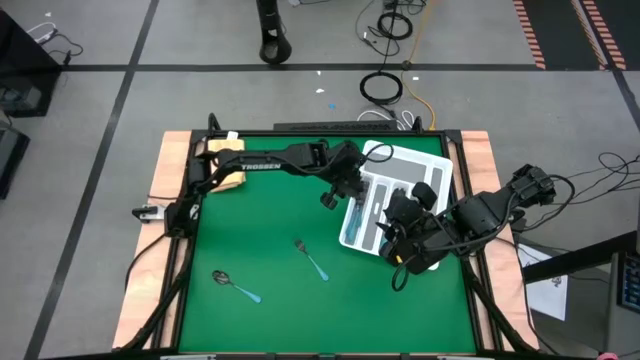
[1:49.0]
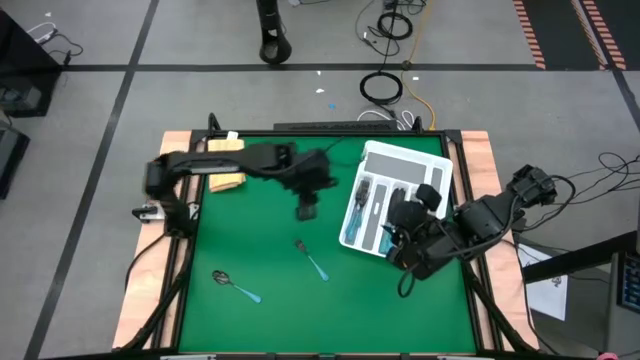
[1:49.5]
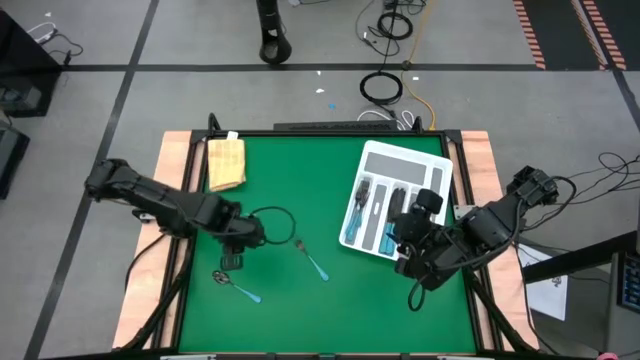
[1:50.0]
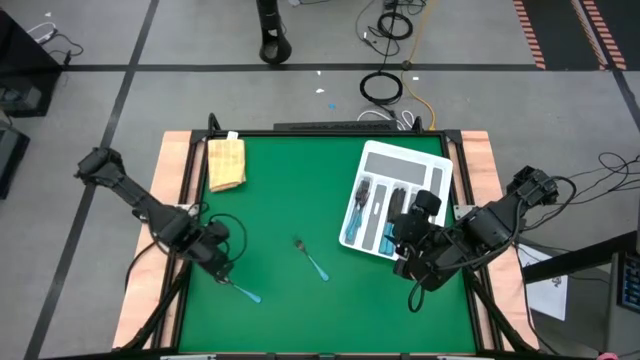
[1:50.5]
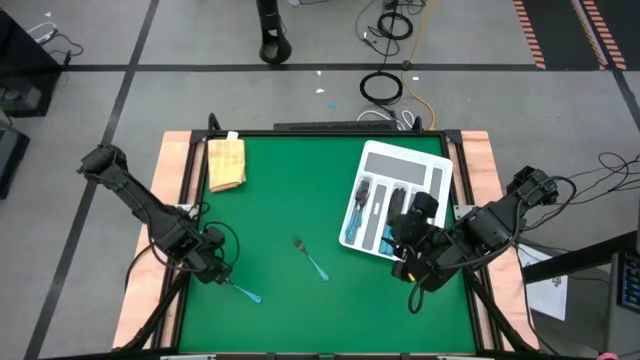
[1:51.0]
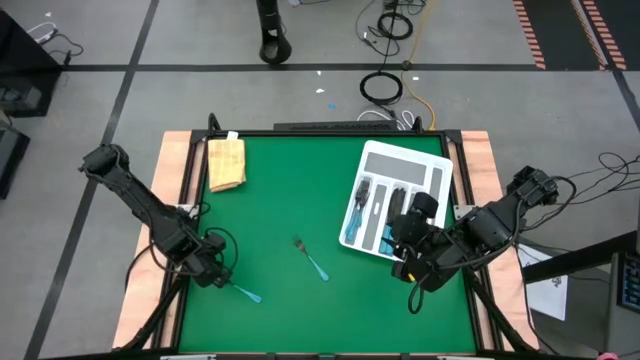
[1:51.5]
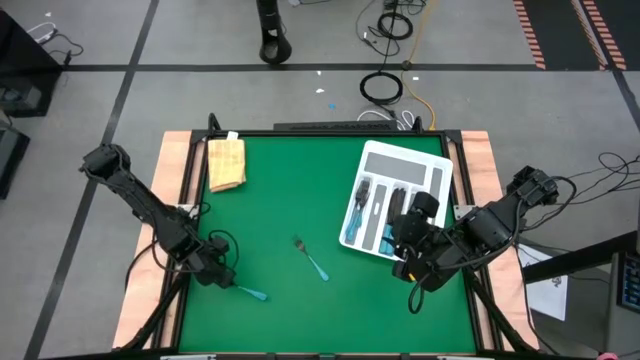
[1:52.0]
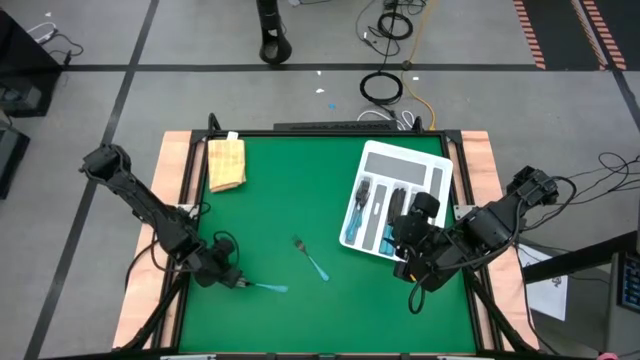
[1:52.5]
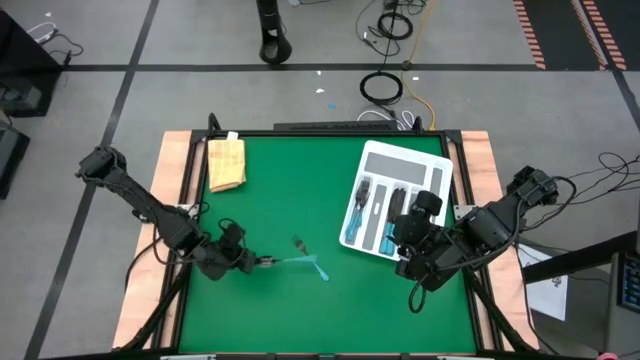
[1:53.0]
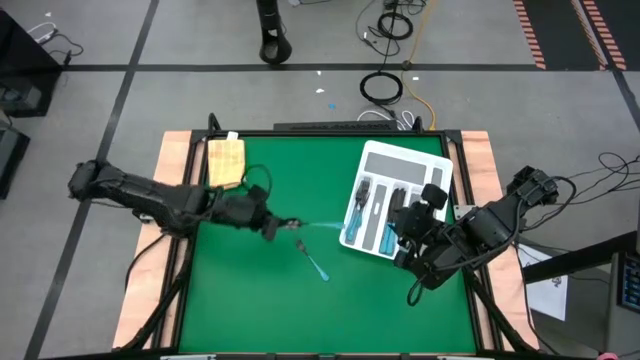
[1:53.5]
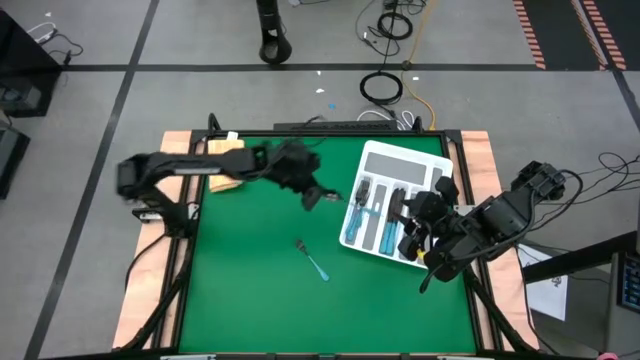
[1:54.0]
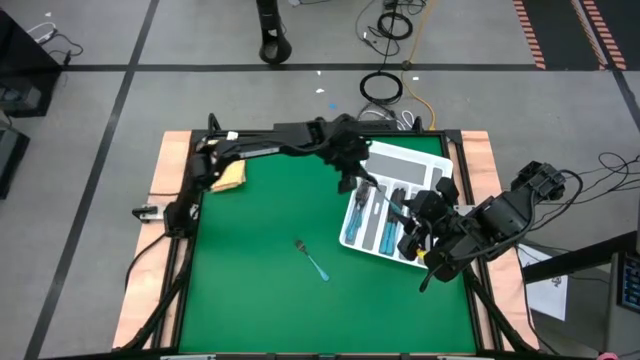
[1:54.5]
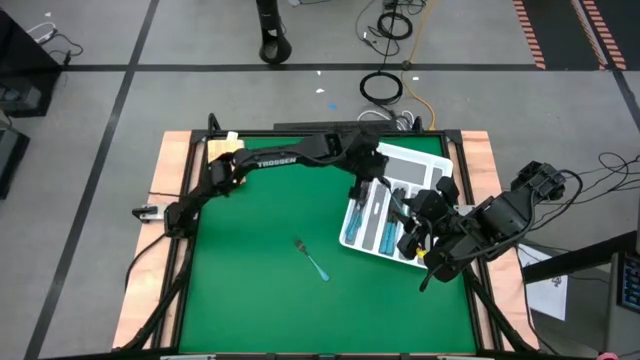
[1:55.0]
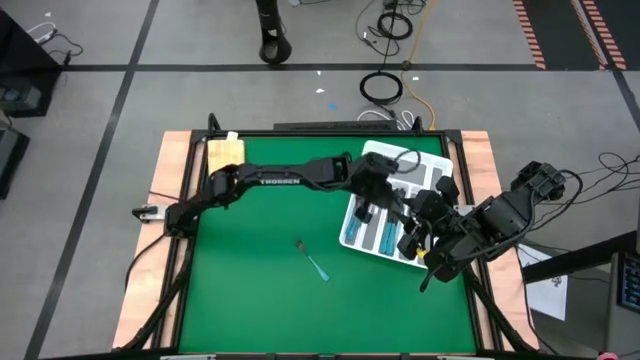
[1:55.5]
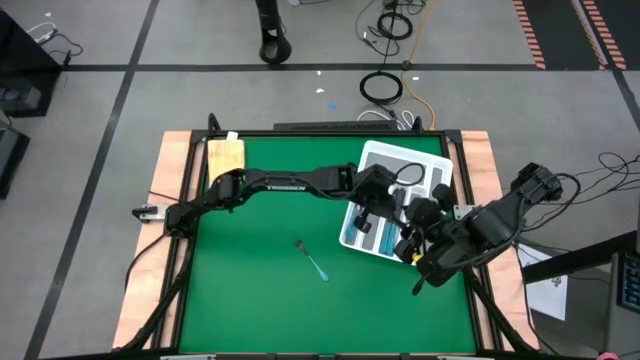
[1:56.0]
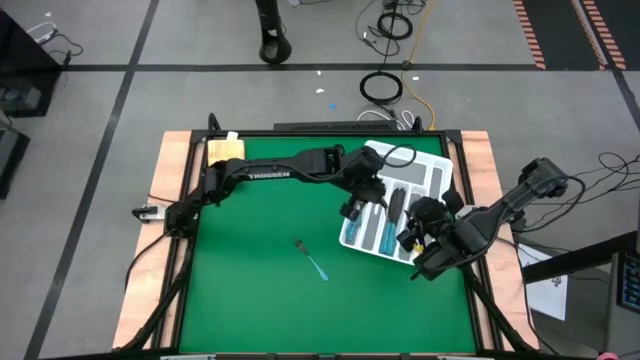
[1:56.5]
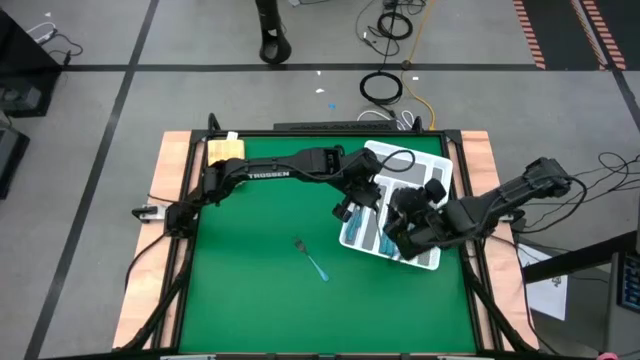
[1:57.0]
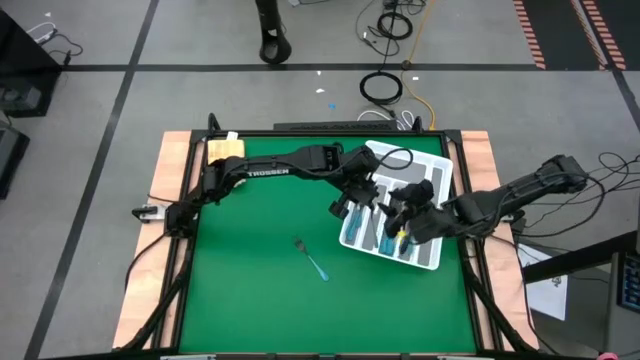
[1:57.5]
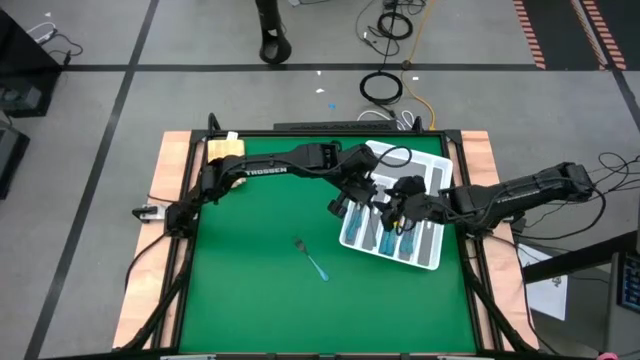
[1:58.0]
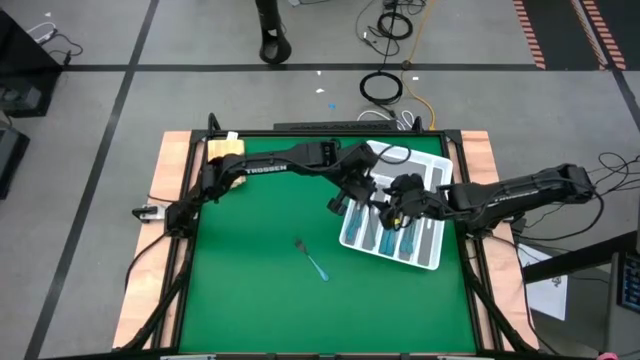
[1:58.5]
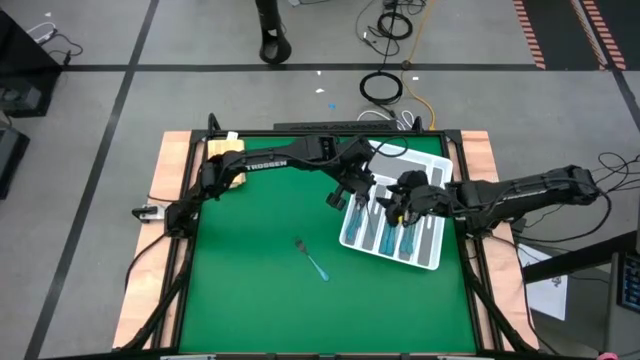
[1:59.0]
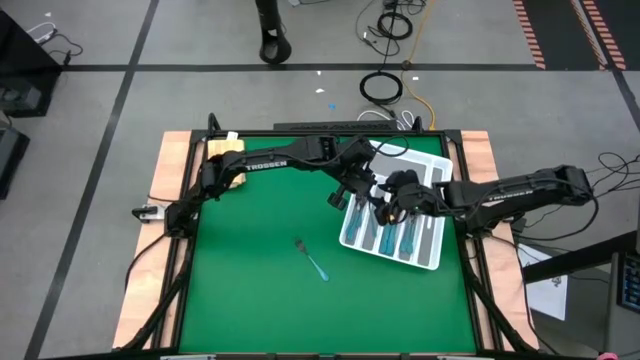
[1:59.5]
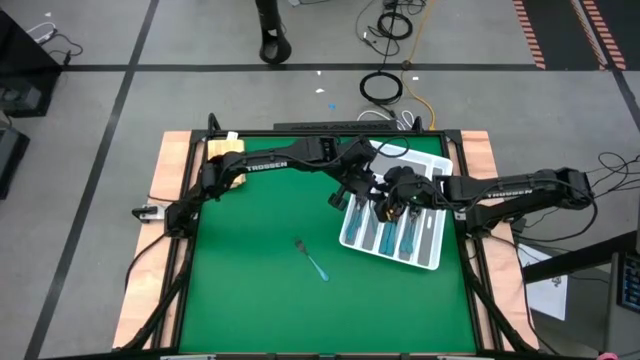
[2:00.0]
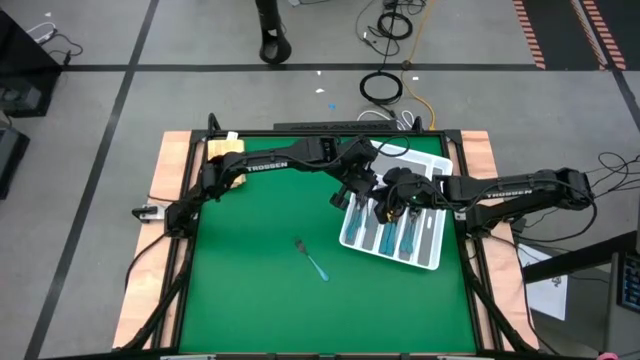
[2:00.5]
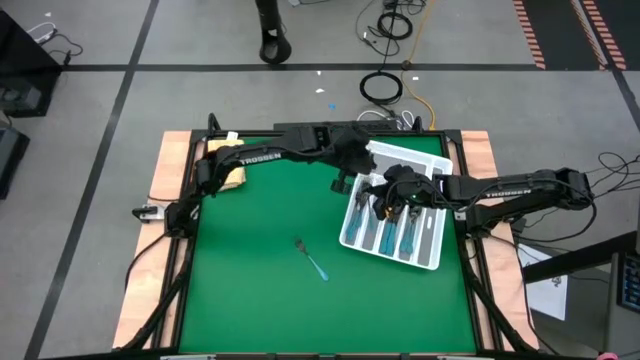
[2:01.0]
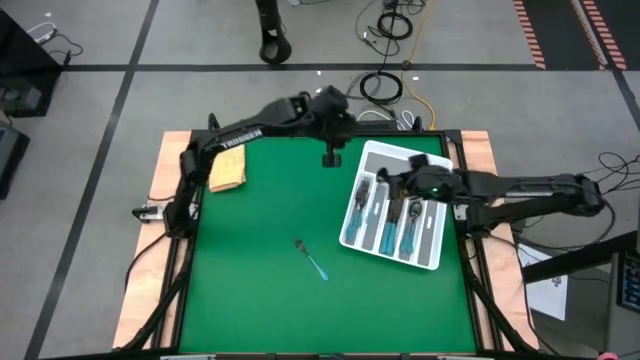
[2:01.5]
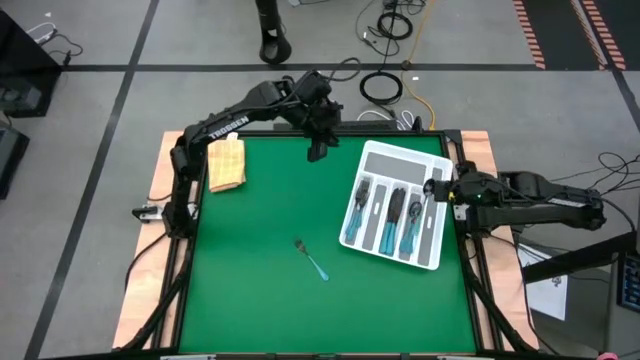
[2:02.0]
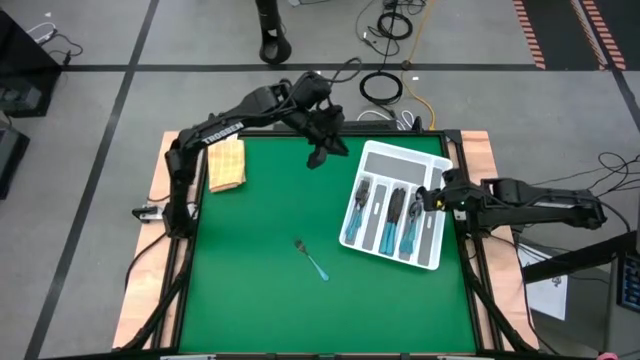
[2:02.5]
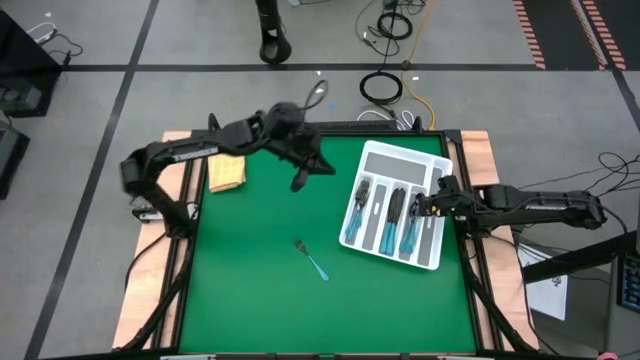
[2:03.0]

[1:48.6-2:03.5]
Task: Sort silverware
Put the blue spoon into the tray

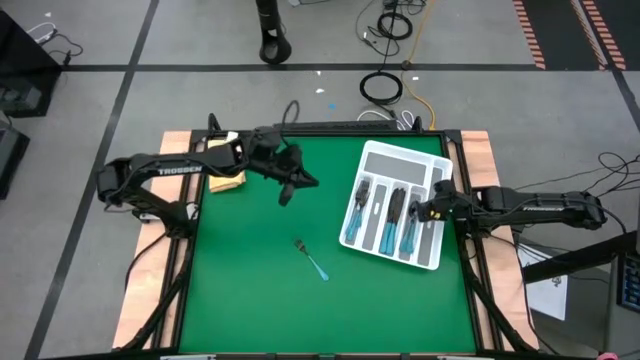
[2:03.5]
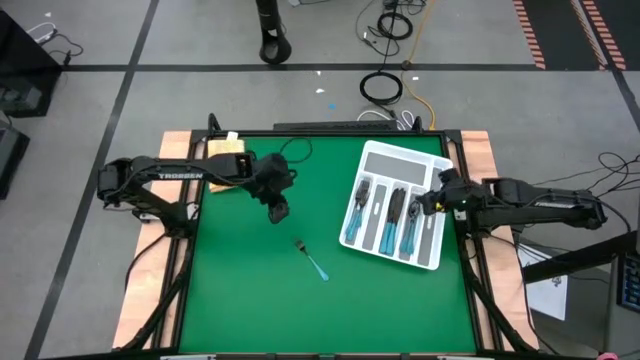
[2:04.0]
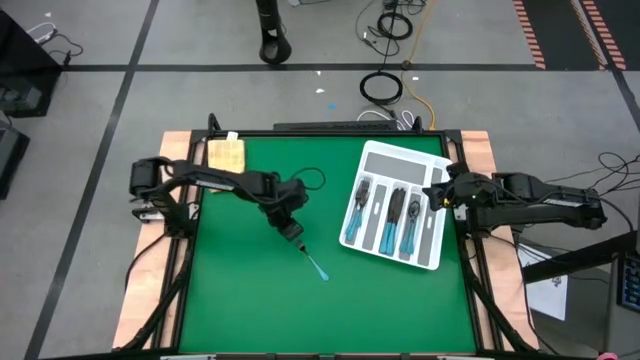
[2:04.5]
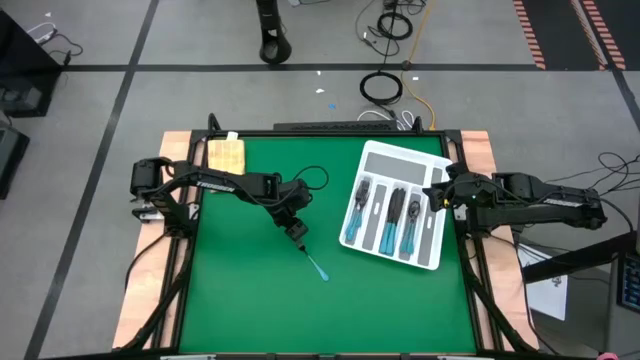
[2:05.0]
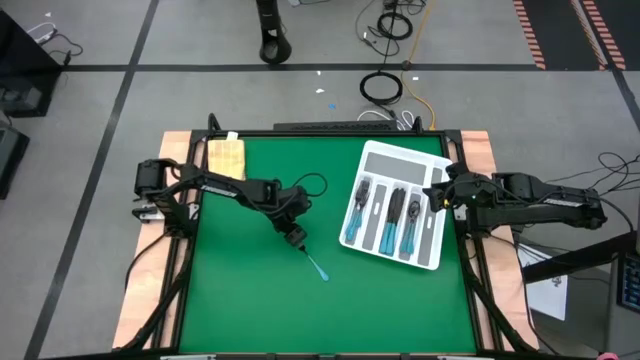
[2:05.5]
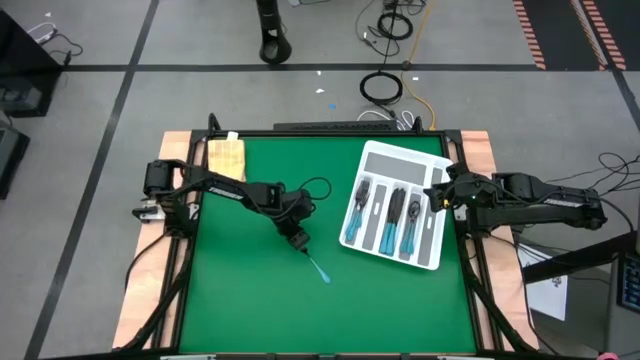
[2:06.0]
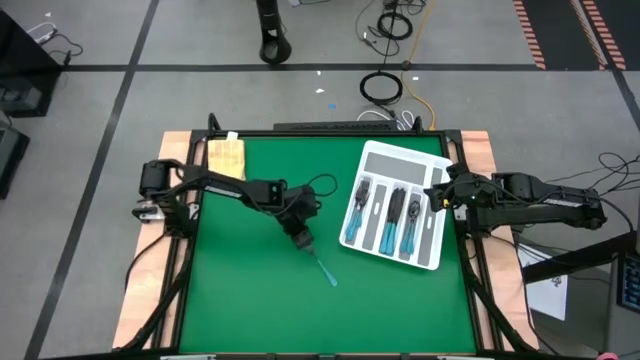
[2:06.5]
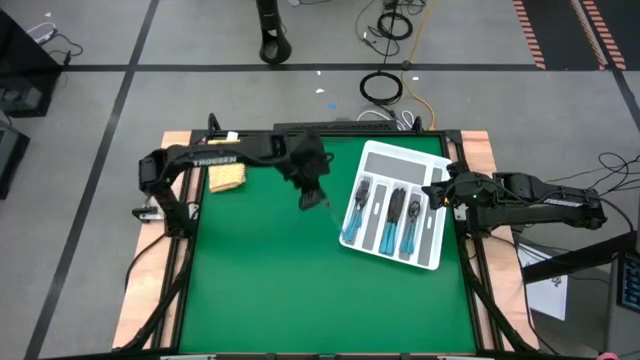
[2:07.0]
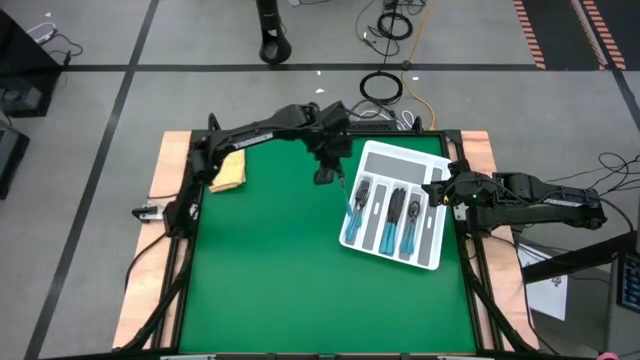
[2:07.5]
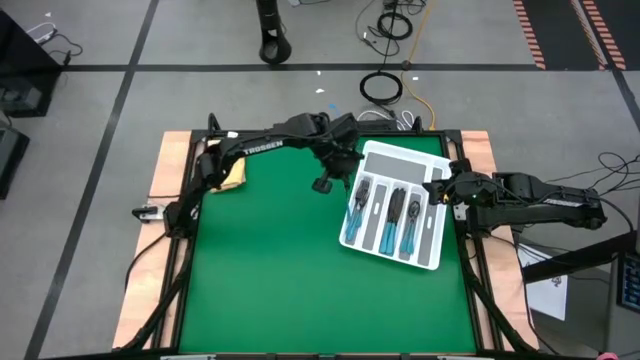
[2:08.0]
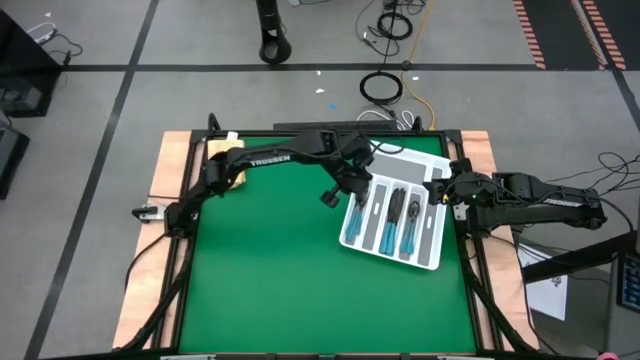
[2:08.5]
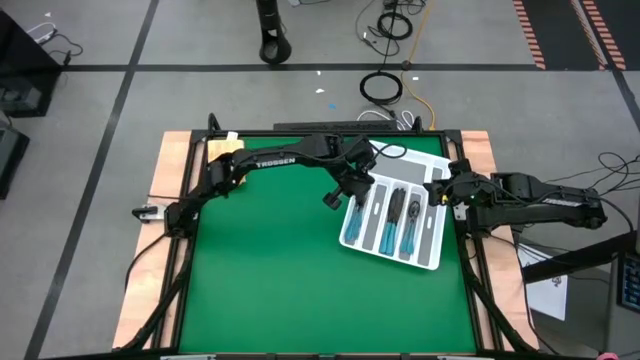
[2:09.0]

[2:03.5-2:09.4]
Put the blue fork into the tray
